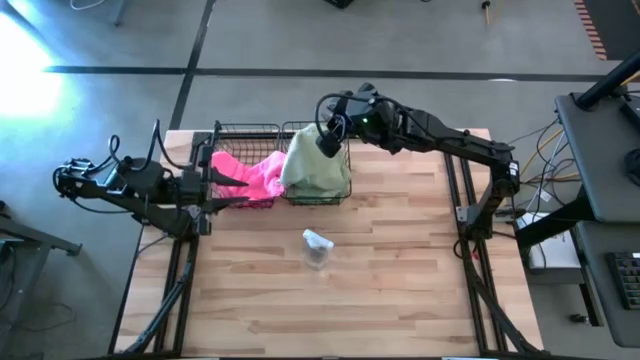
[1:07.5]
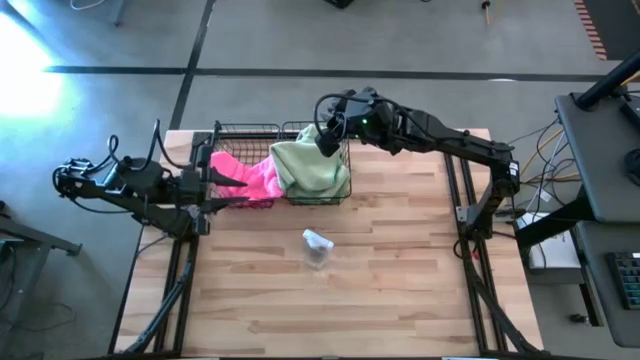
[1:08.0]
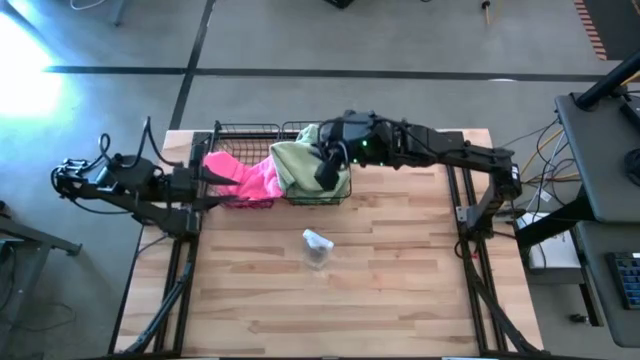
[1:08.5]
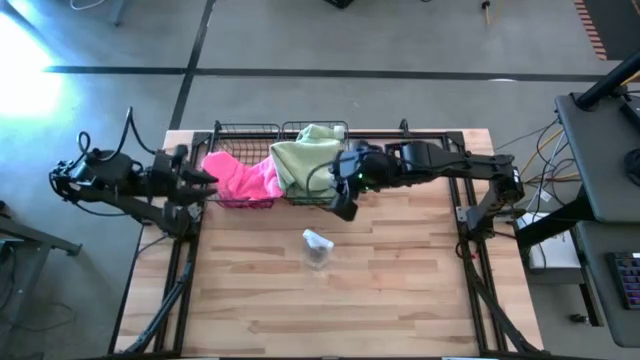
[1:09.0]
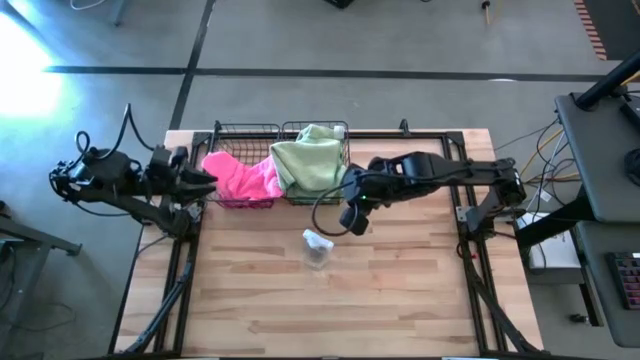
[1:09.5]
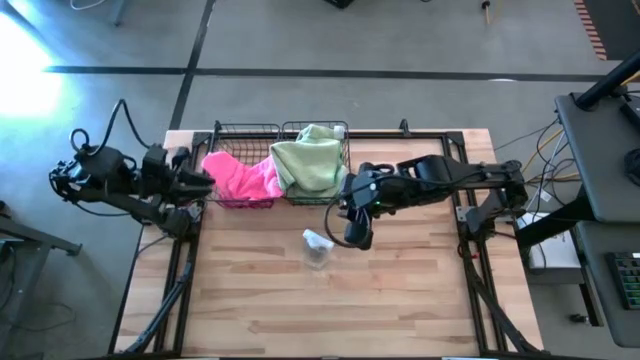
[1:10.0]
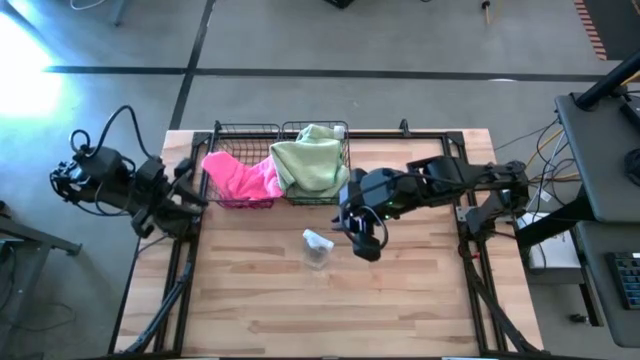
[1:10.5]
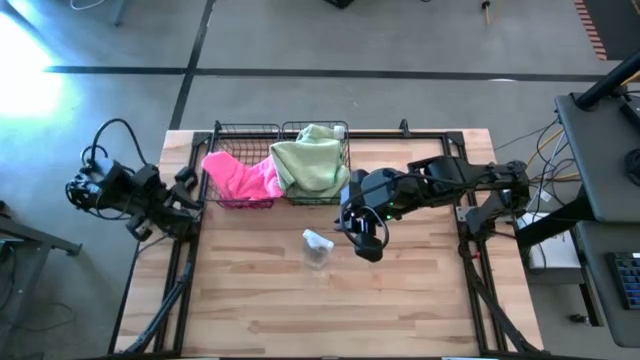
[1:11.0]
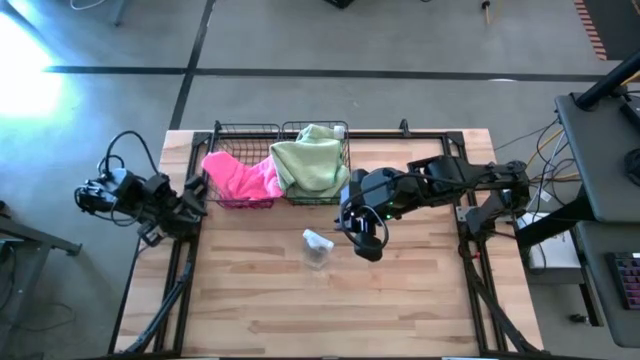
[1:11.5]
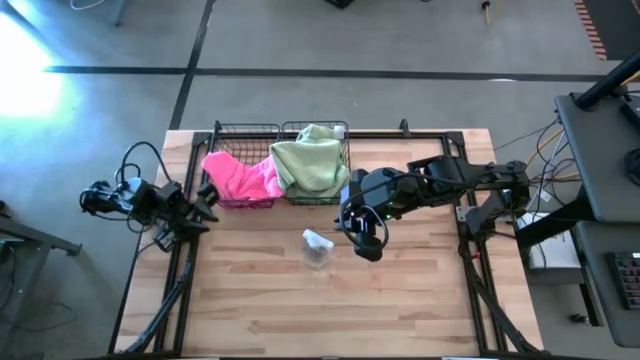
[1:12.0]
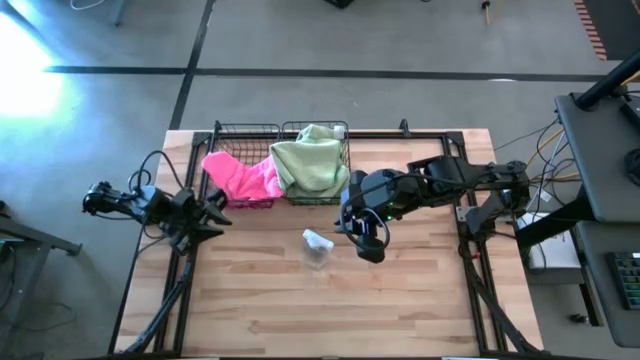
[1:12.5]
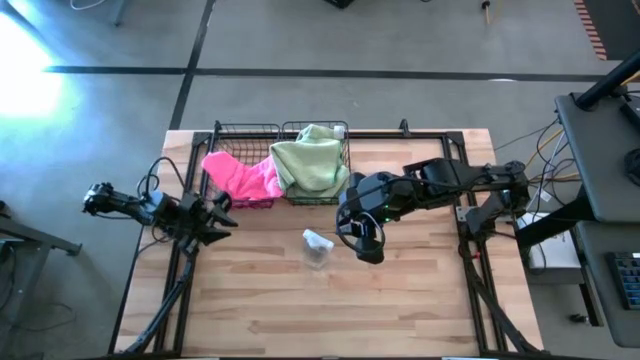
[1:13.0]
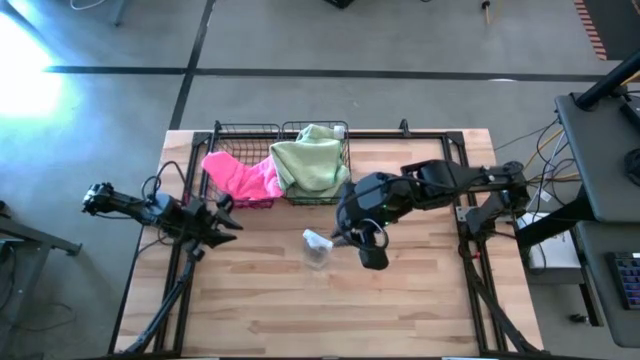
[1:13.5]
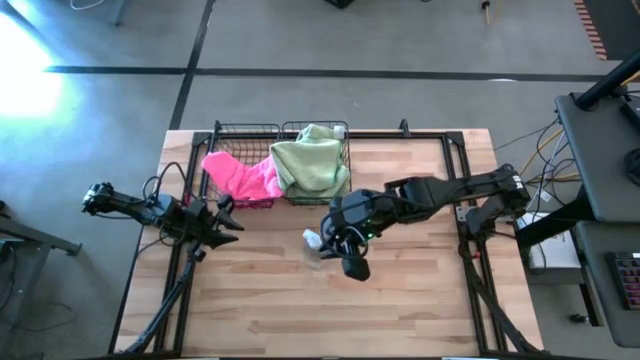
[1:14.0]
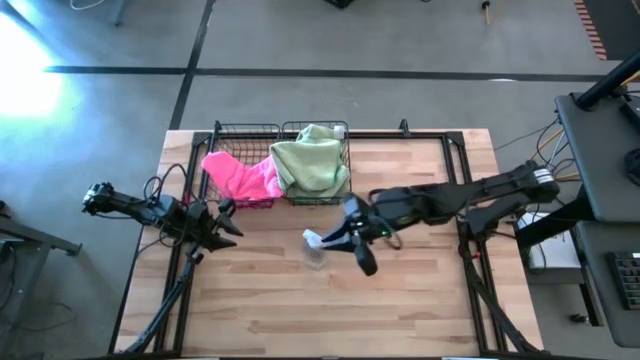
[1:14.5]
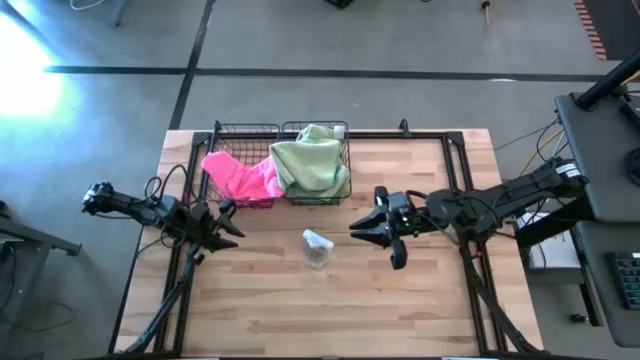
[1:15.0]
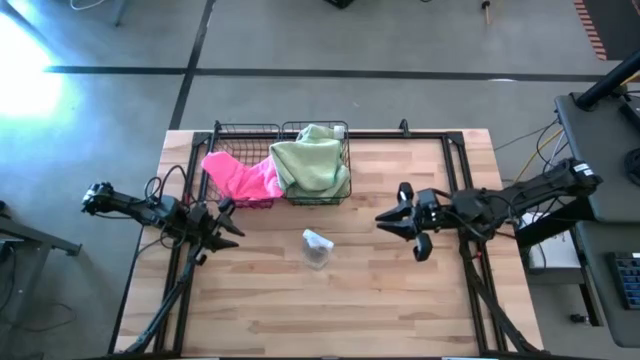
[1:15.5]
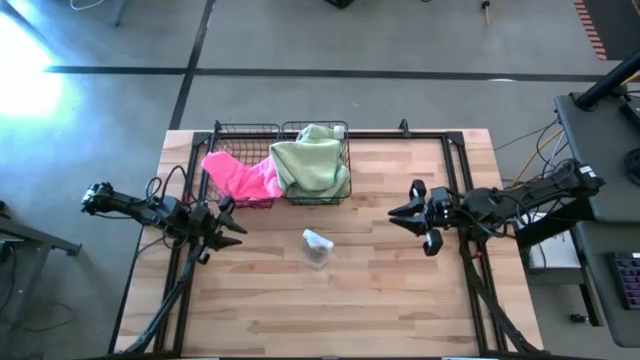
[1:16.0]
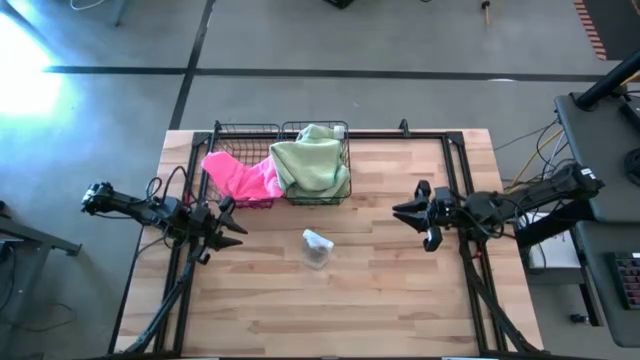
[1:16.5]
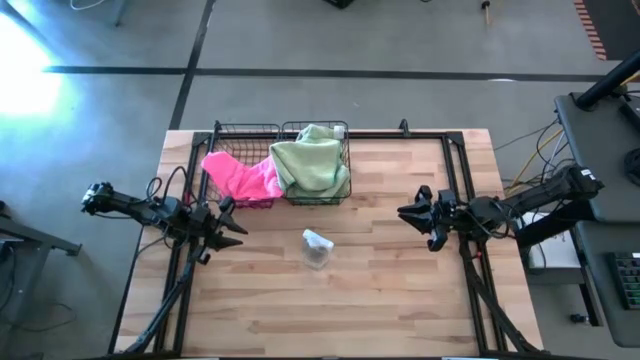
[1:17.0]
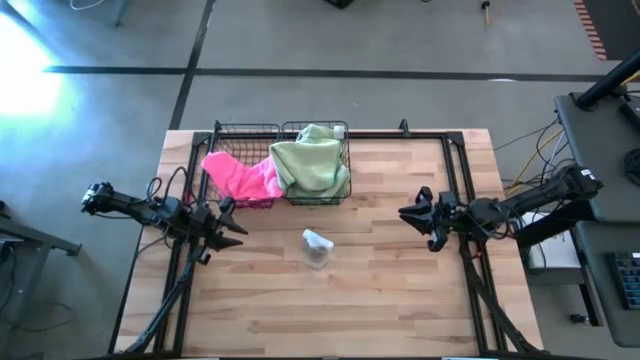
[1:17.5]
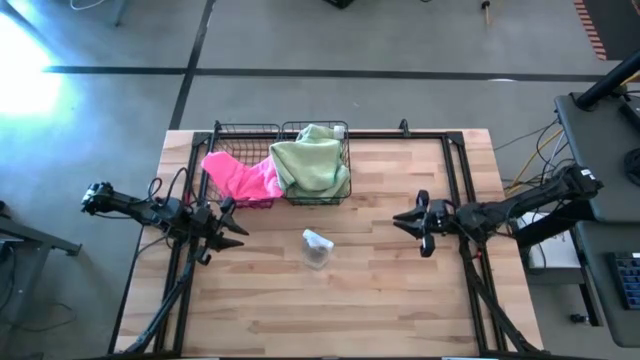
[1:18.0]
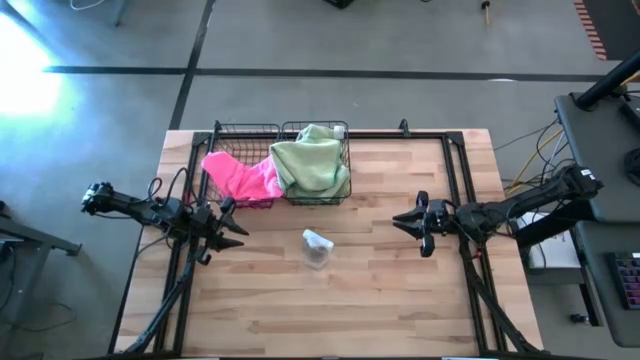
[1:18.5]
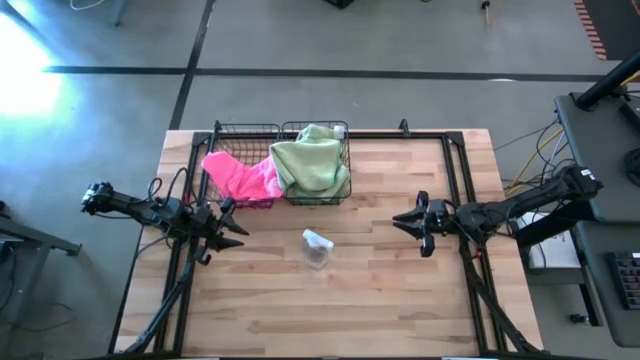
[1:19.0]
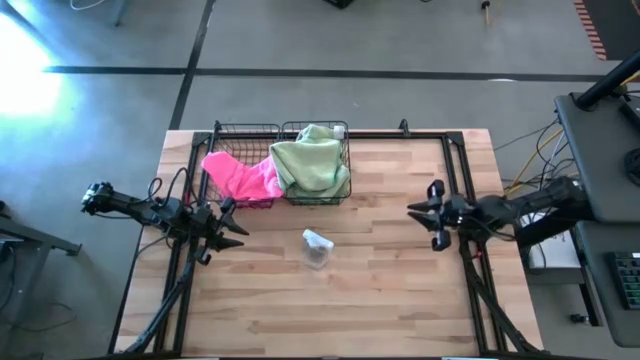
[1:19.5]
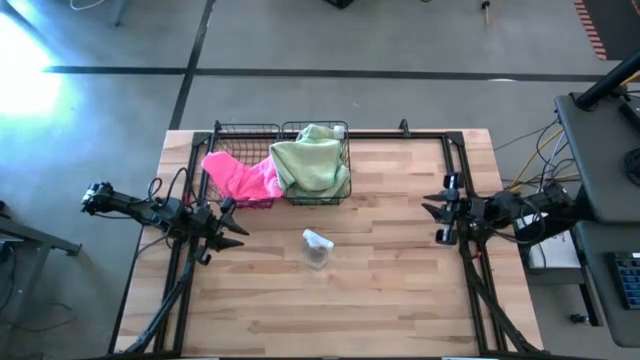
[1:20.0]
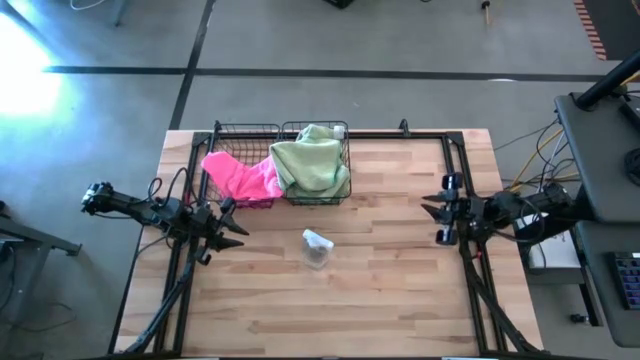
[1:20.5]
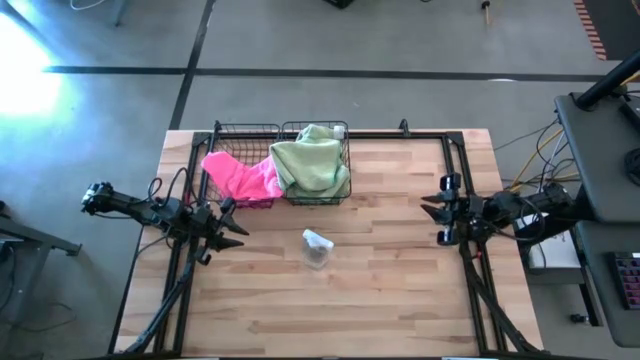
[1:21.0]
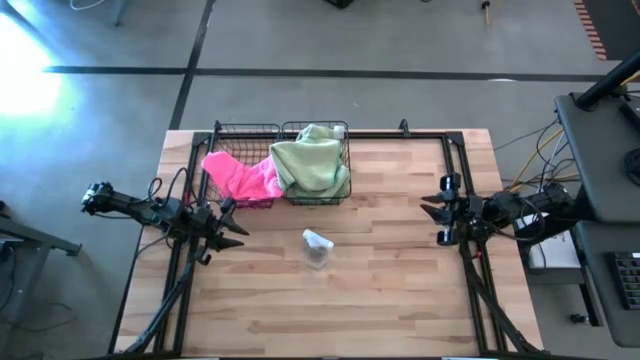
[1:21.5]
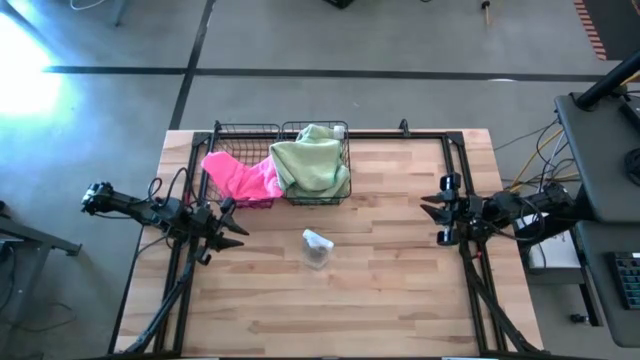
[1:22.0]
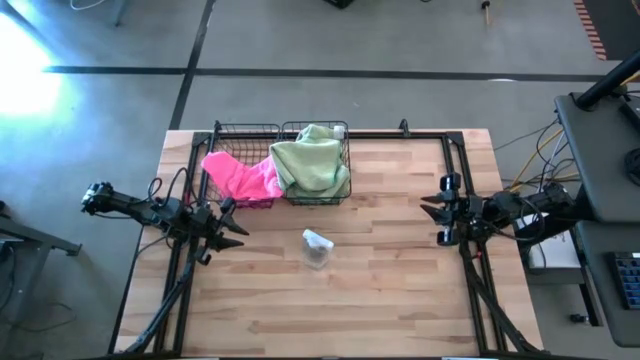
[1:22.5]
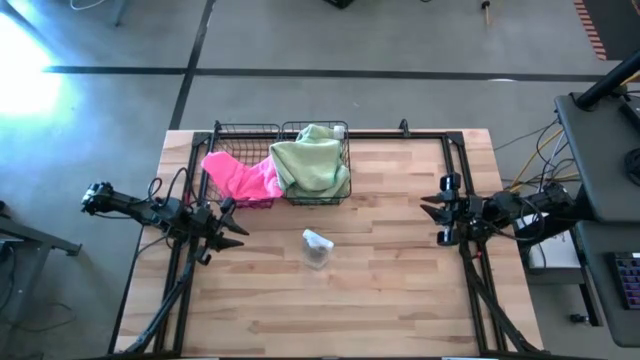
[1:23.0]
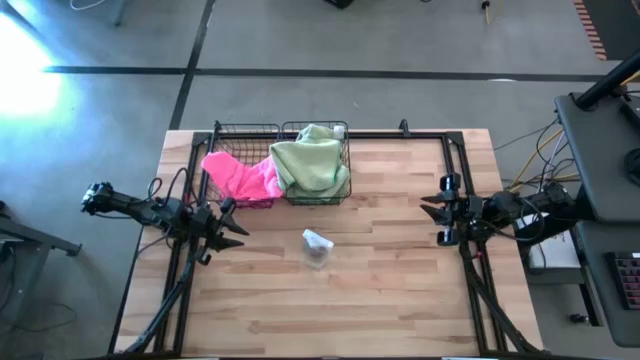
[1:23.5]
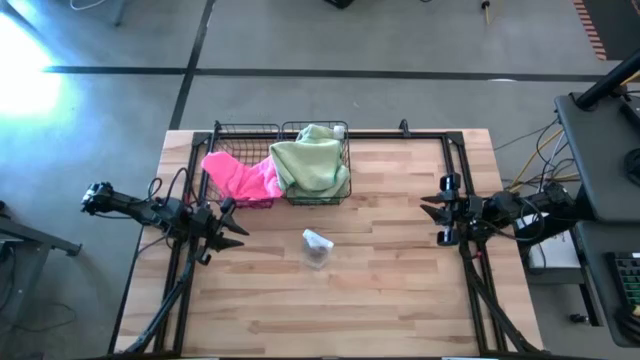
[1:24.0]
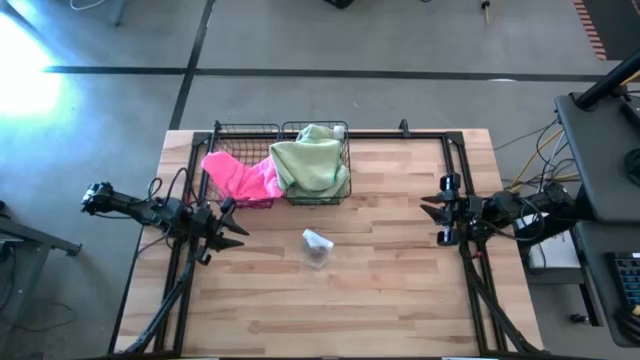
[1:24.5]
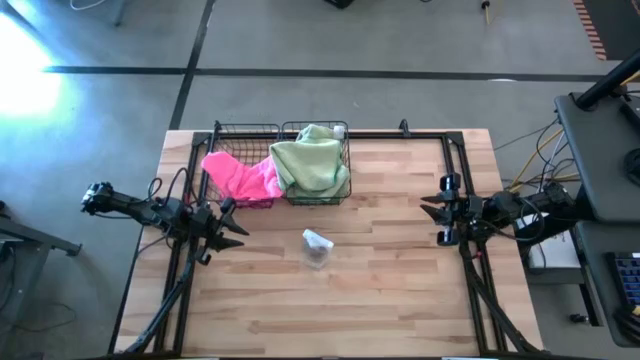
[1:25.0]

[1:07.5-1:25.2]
Task: Sort microfiber towel by color & place in baskets
Return to Home Position

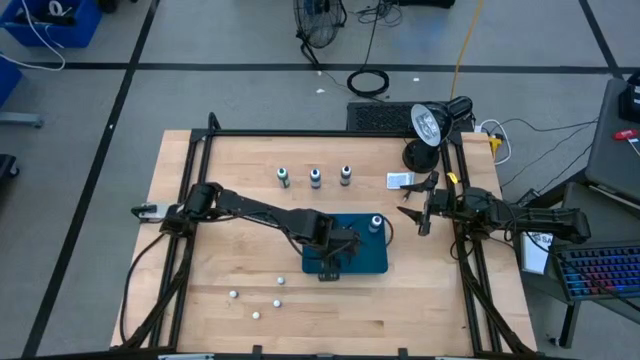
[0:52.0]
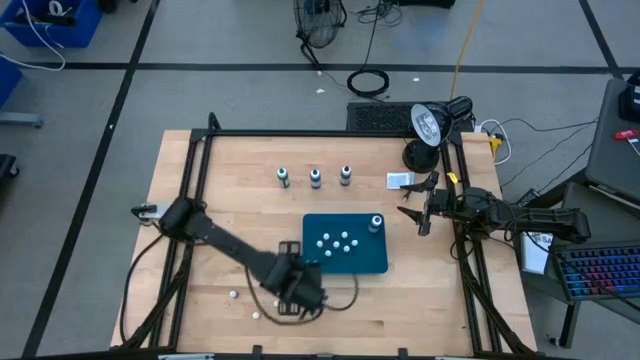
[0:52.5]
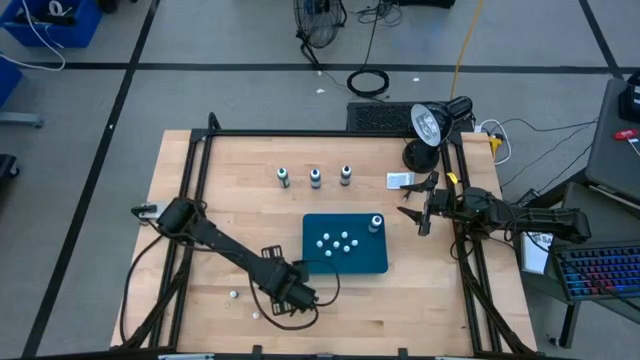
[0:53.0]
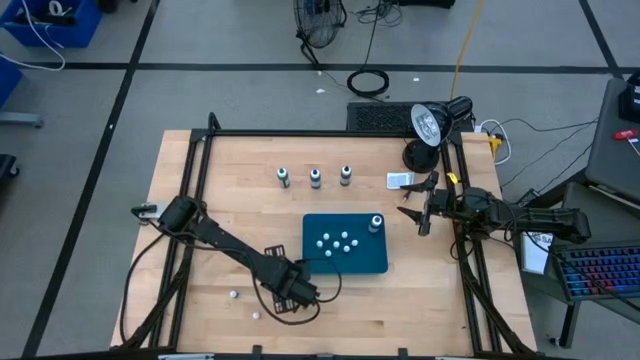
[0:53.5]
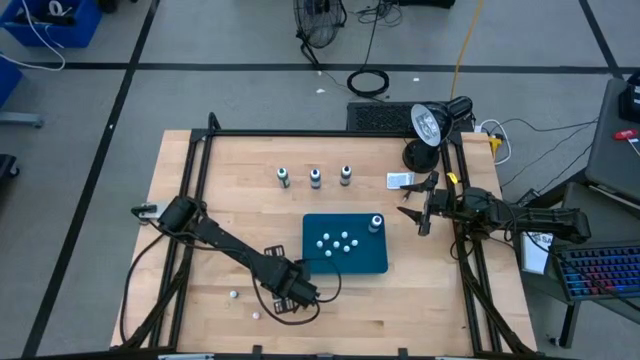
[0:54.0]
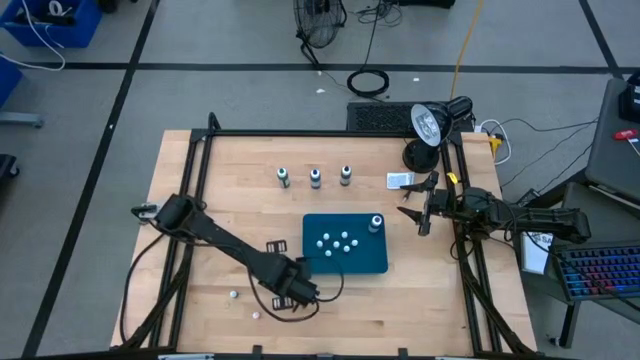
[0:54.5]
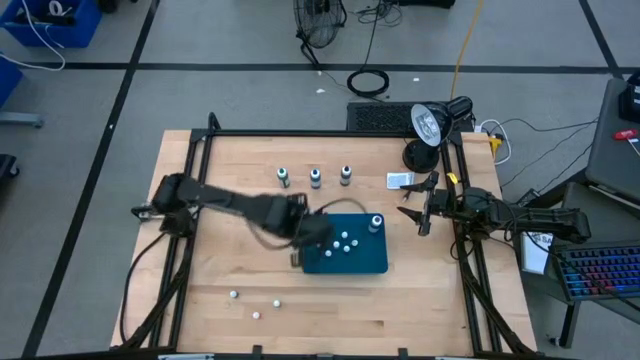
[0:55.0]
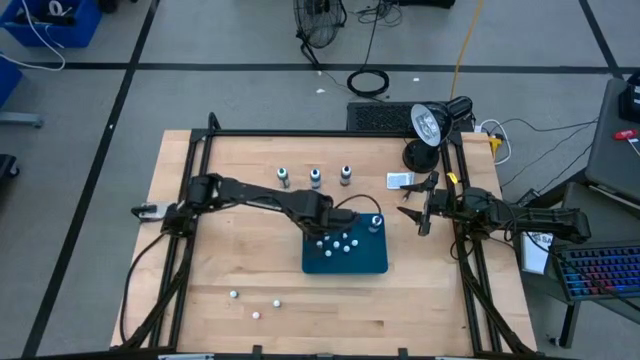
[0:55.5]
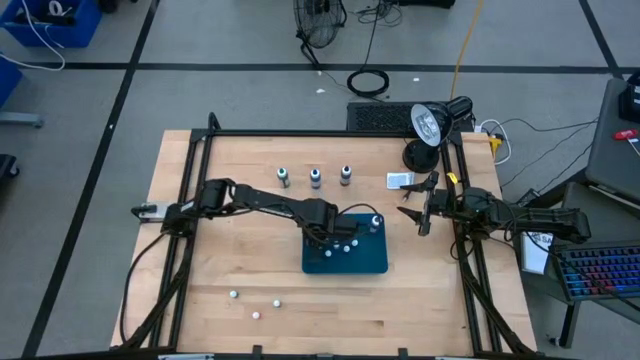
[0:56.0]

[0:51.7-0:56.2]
Task: Pick & Place food coloring
Put the small green food coloring bottle into the blue bin
